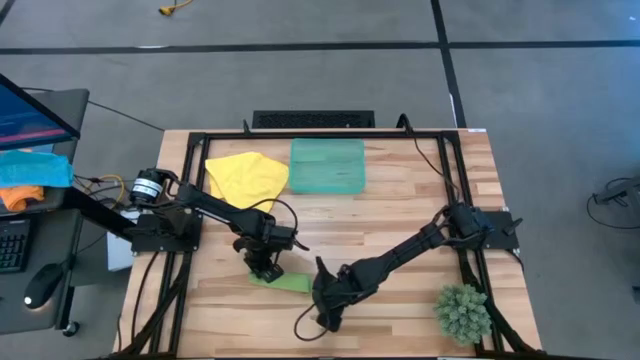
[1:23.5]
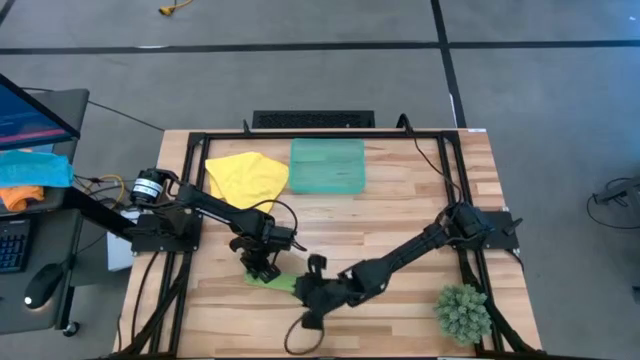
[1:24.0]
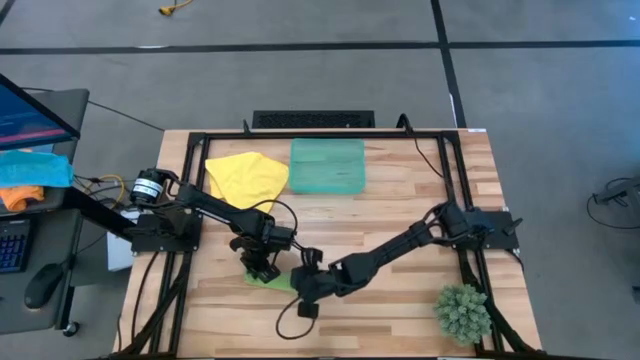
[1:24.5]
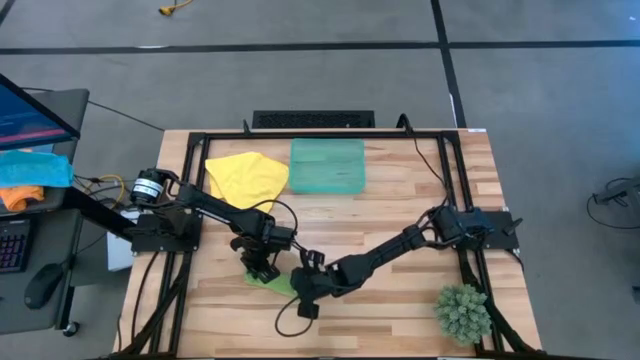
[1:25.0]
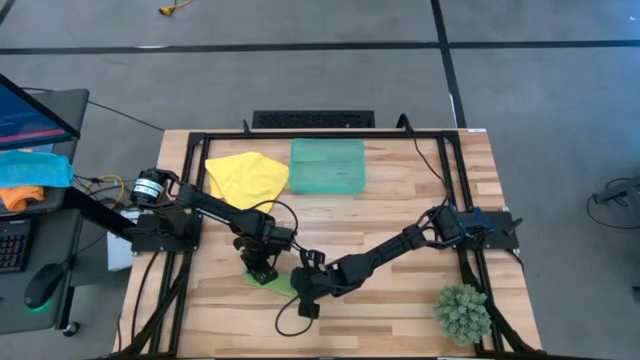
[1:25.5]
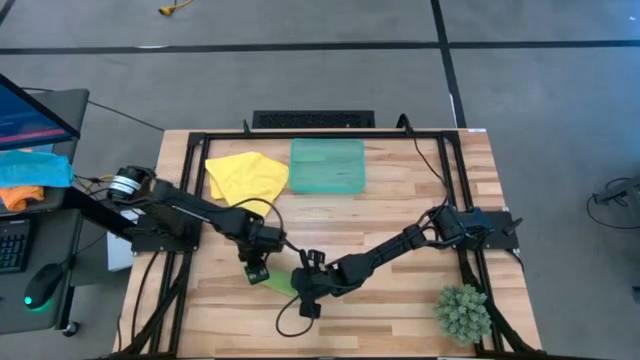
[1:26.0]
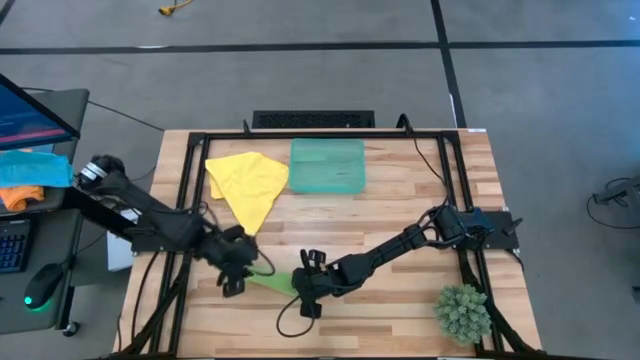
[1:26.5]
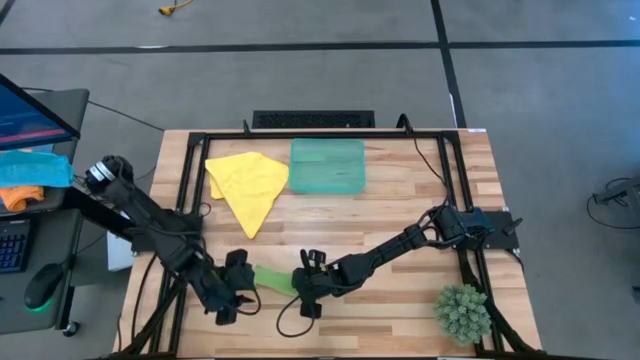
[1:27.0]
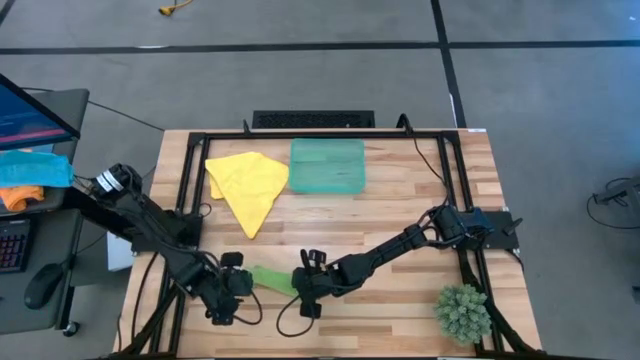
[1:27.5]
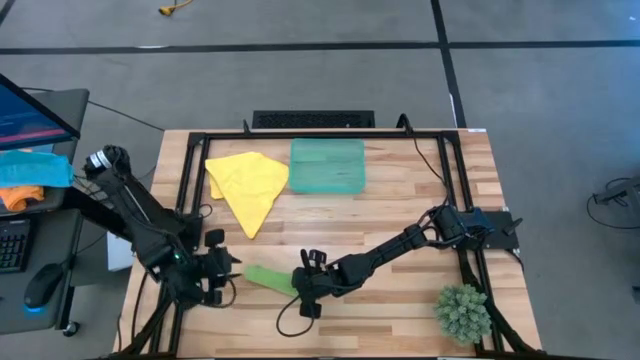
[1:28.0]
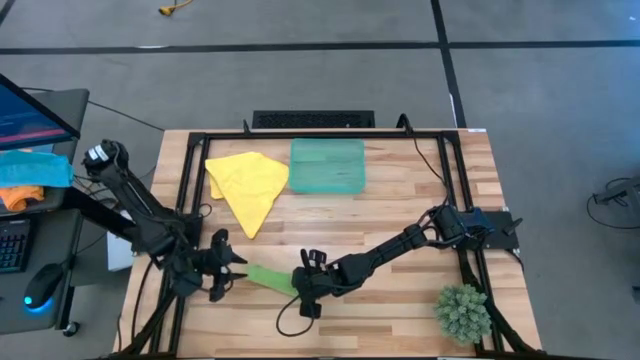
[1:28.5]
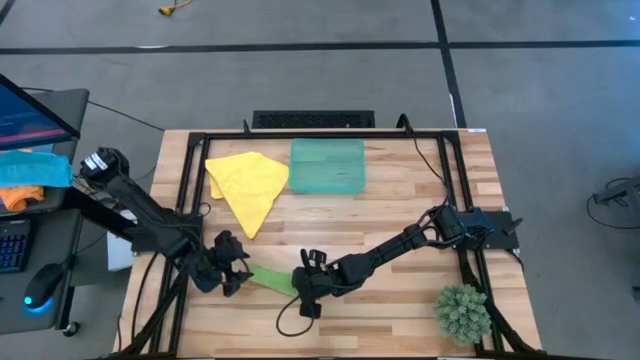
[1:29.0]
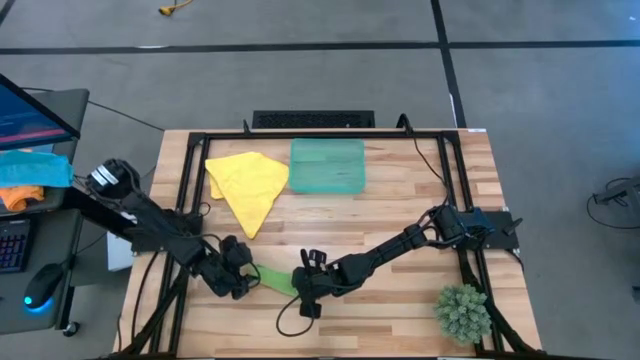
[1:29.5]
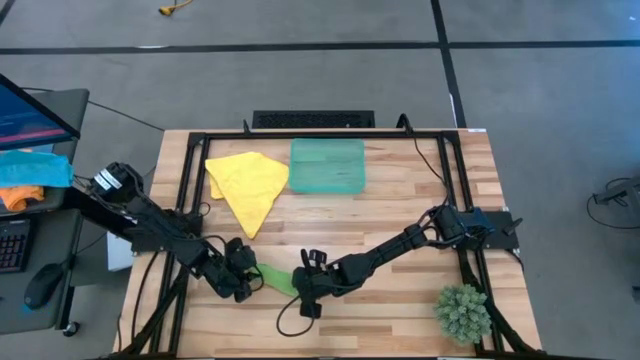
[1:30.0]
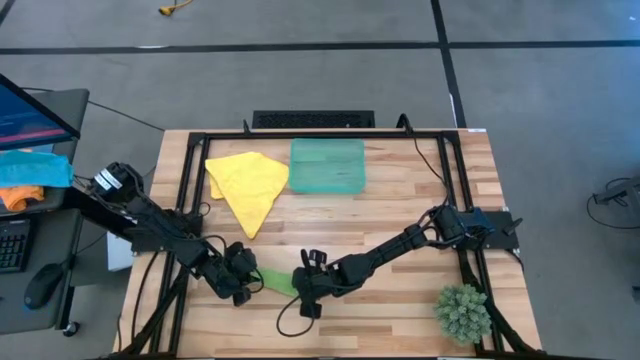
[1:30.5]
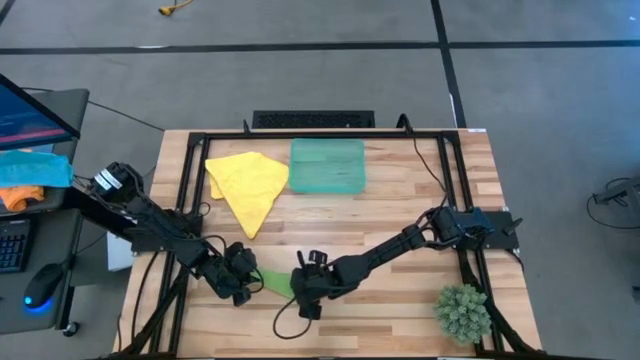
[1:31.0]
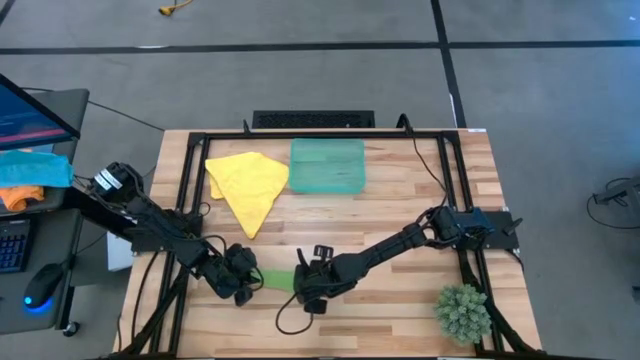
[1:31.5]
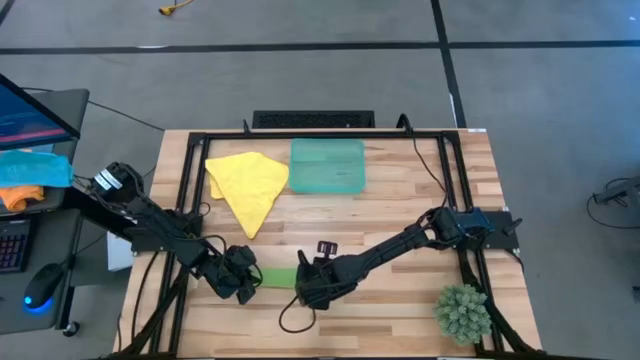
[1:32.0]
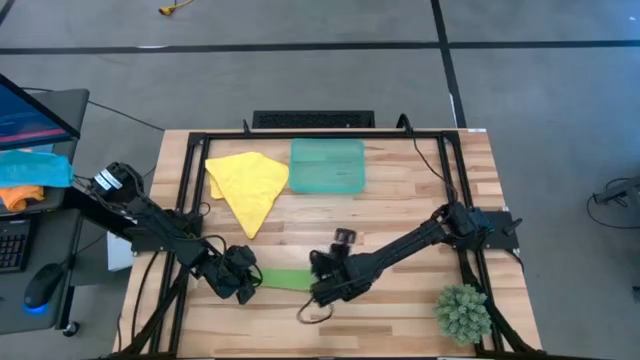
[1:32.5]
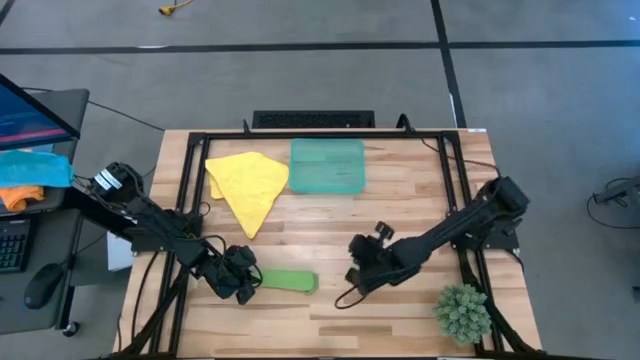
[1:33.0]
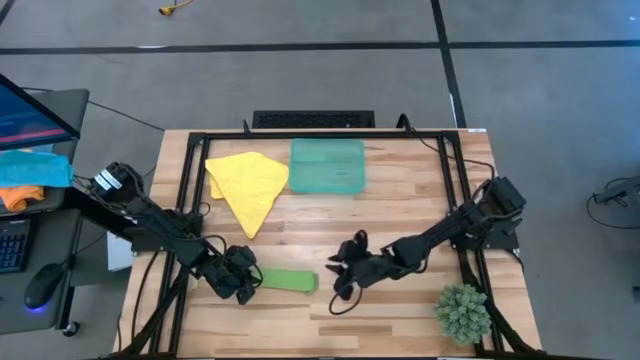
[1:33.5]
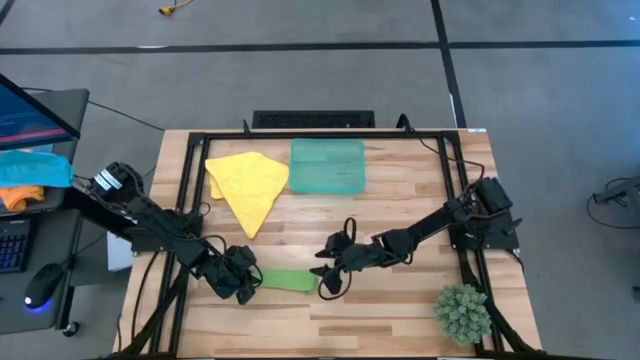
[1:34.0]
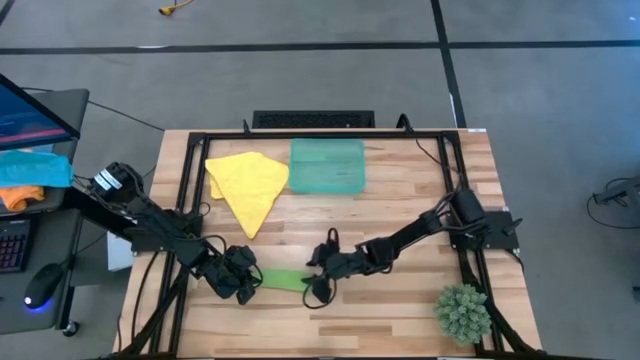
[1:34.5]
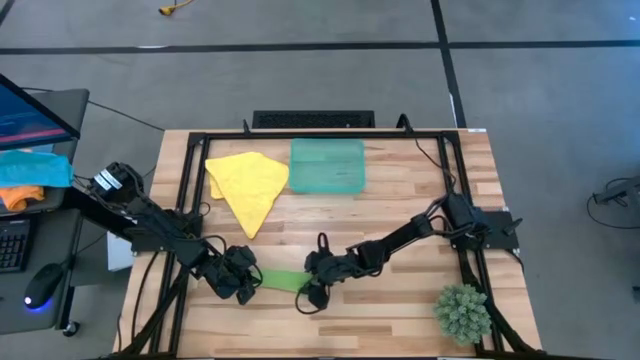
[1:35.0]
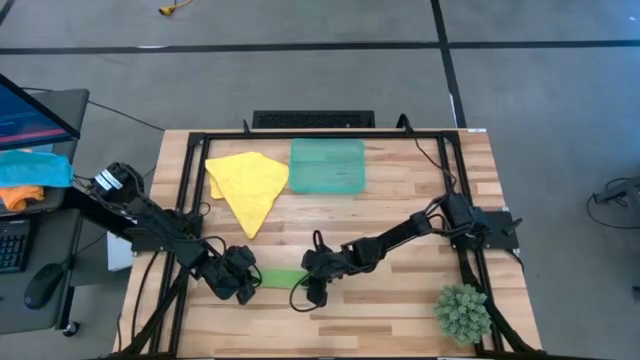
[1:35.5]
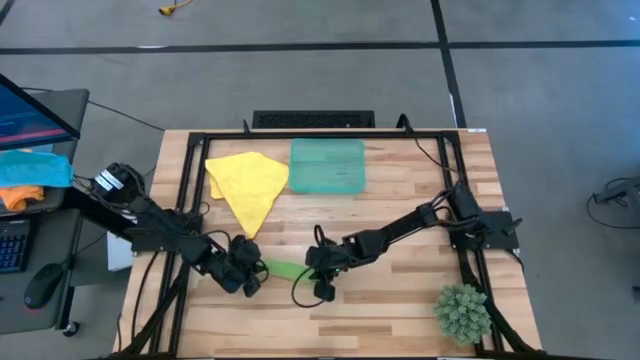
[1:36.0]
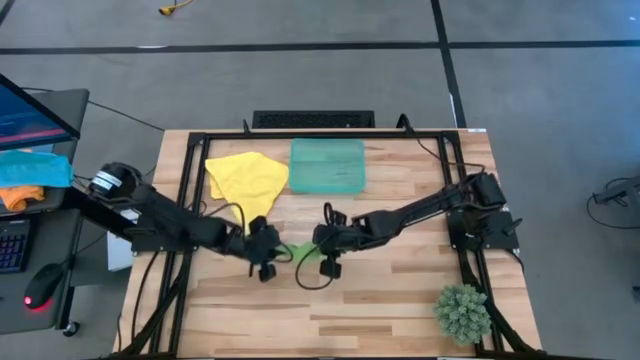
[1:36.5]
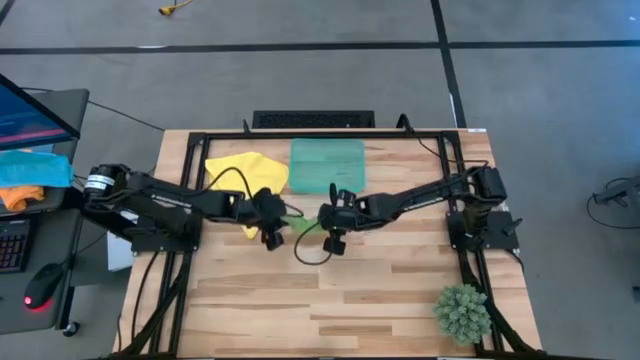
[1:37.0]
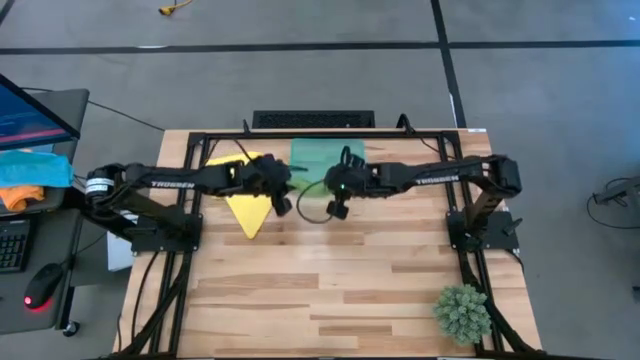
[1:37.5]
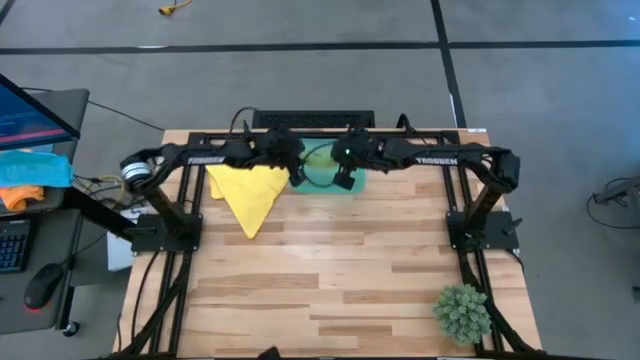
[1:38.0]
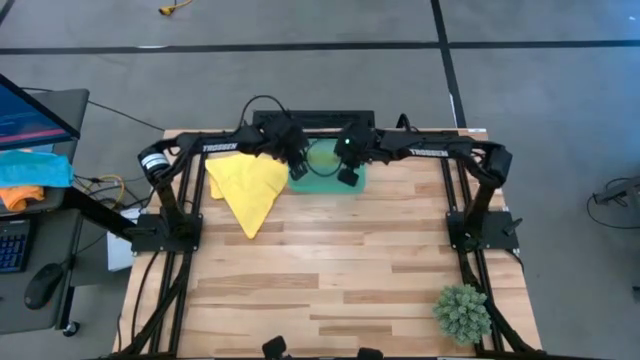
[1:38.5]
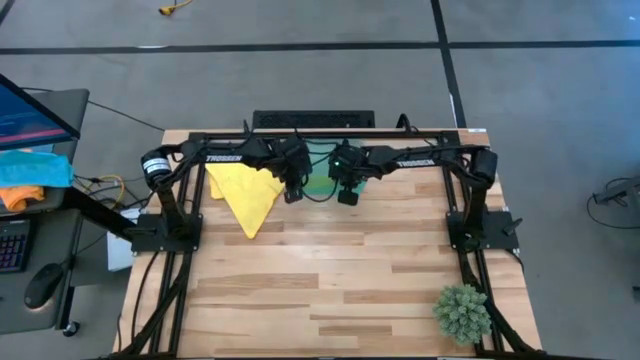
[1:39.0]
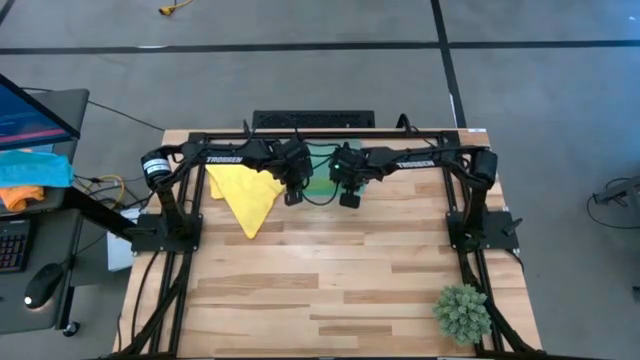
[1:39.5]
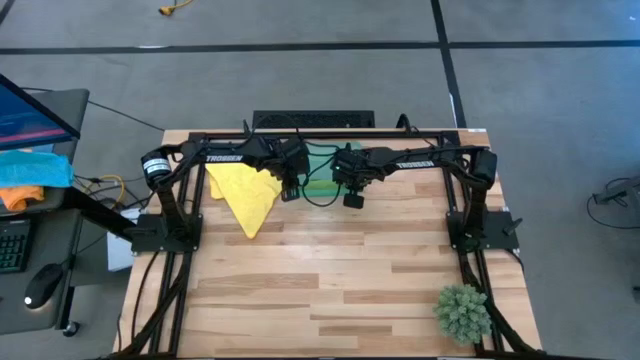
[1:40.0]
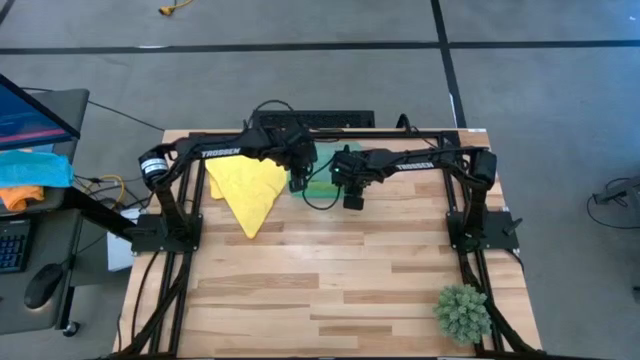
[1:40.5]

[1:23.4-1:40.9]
Task: Roll microfiber towels into tight, uniform cylinder then place into a basket
Put the rolled green microfiber towel into the green bin

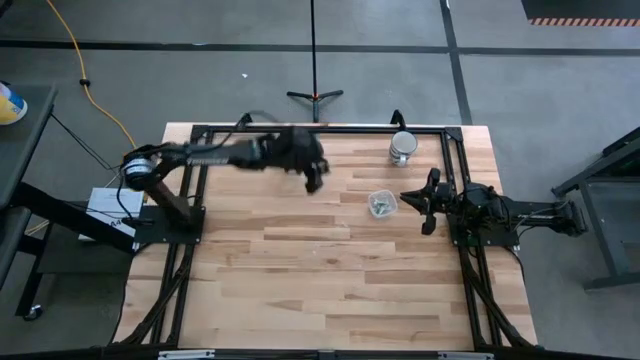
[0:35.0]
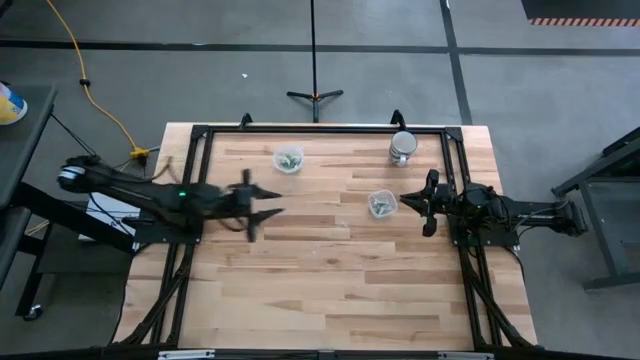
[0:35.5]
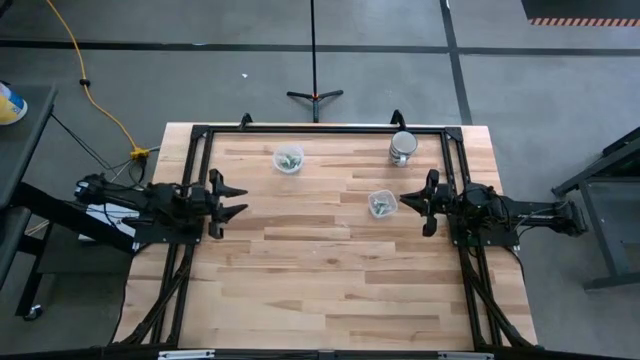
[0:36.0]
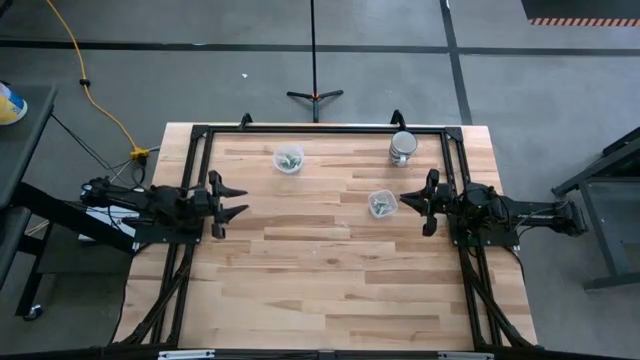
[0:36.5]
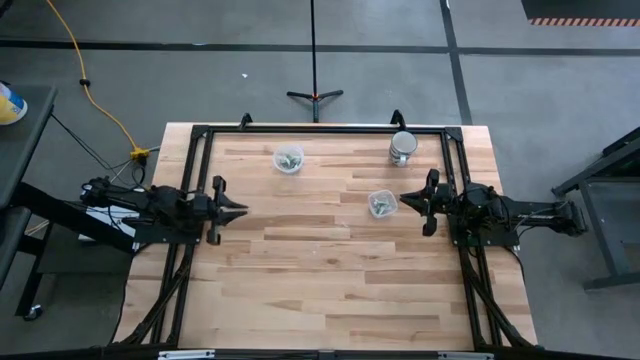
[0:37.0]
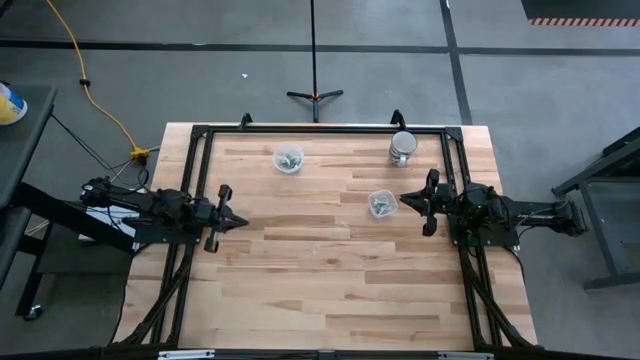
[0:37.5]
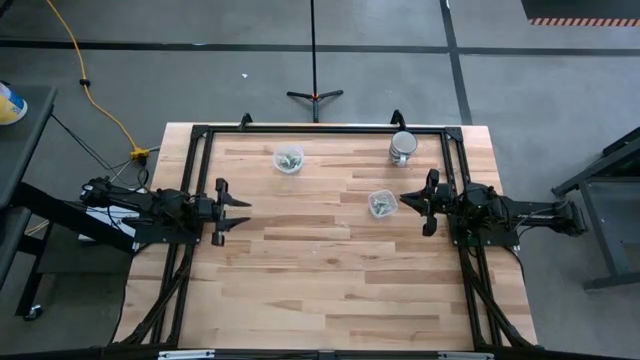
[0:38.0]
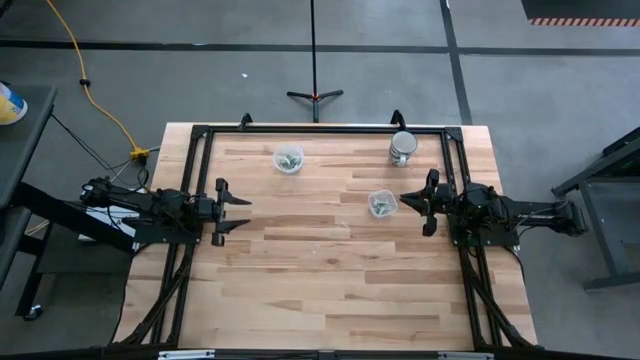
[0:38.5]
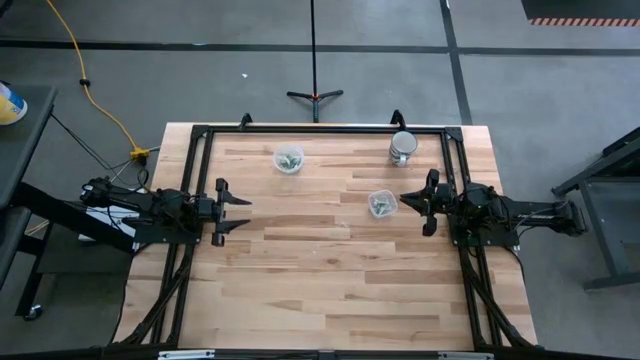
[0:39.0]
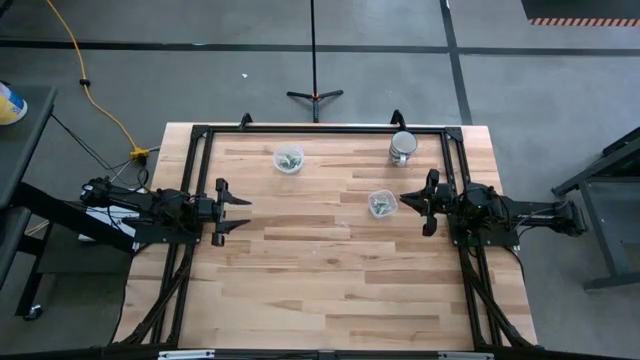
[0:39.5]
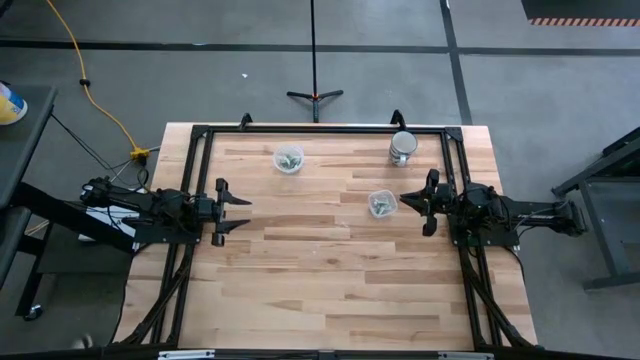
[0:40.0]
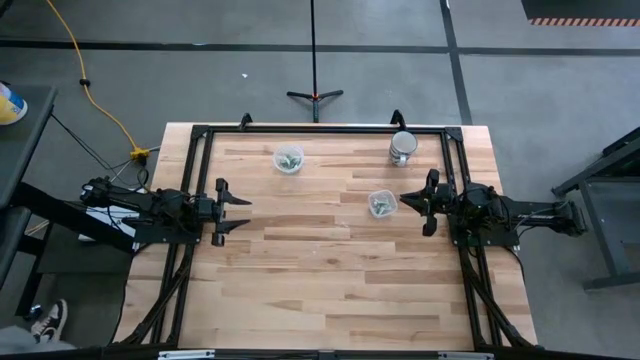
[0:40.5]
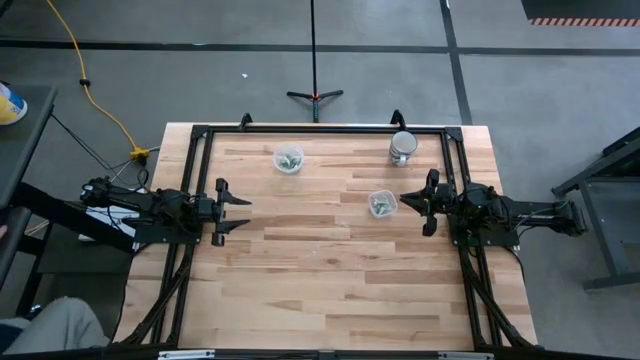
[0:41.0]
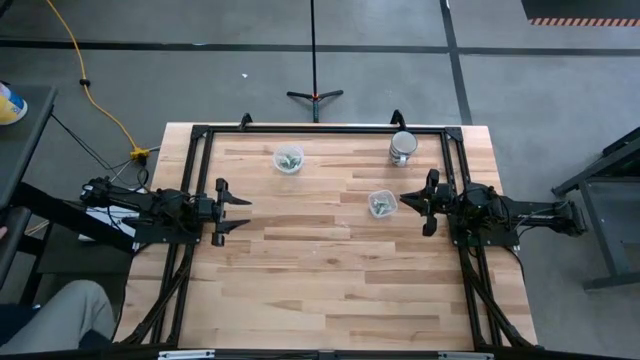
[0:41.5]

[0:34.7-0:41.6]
Task: Pick and place Stevia / Truvia into bins
Return to Home Position
